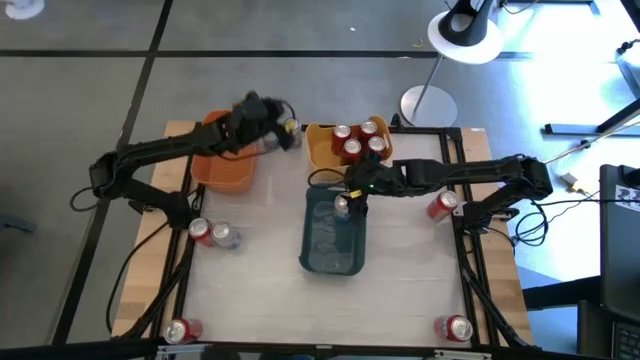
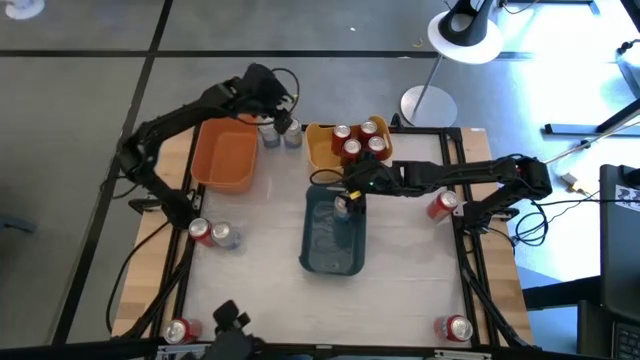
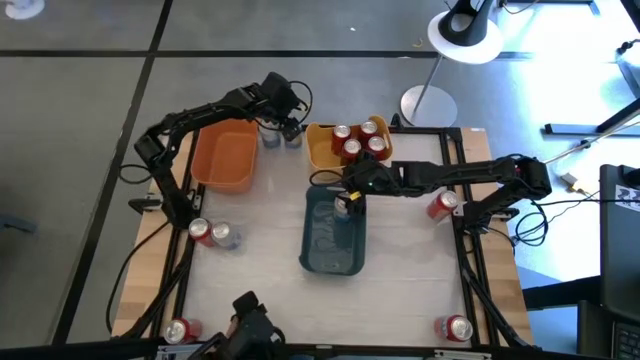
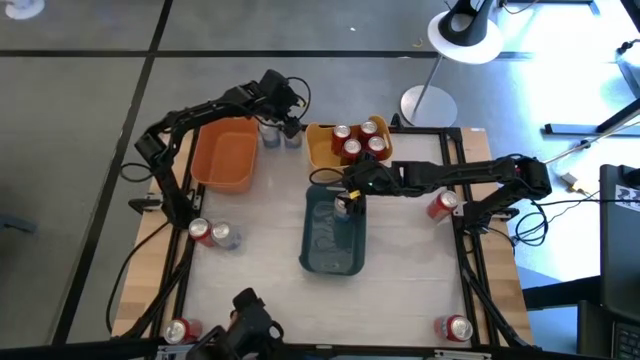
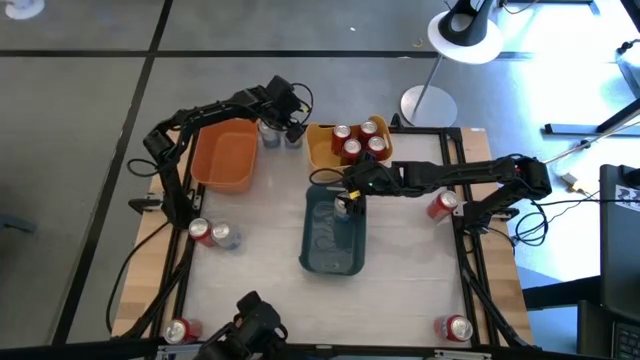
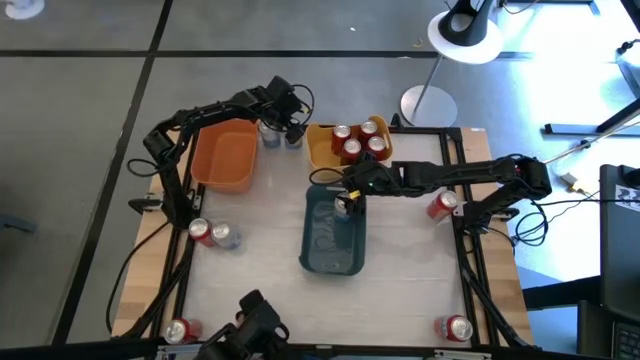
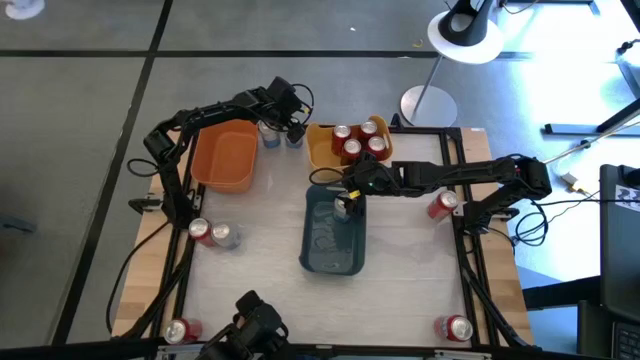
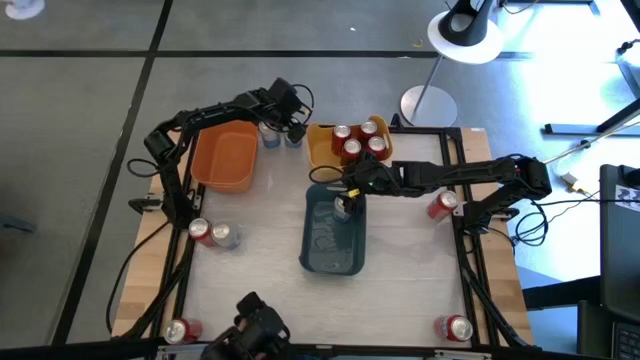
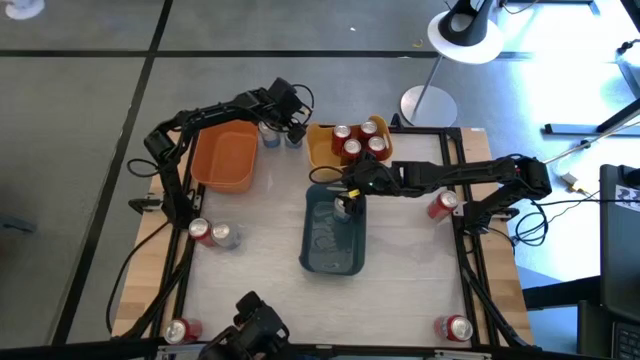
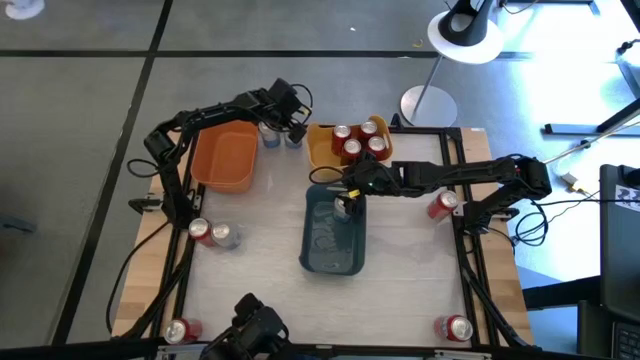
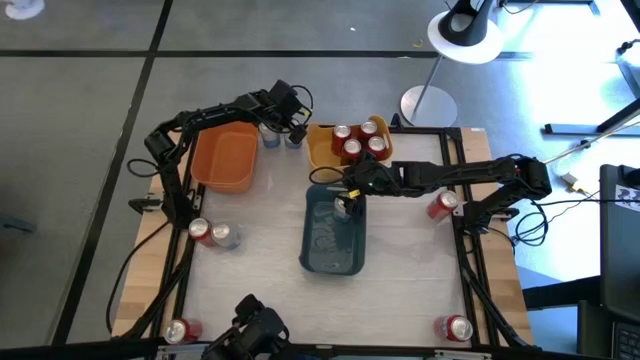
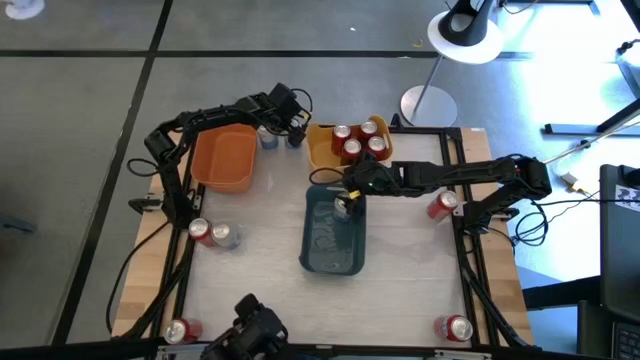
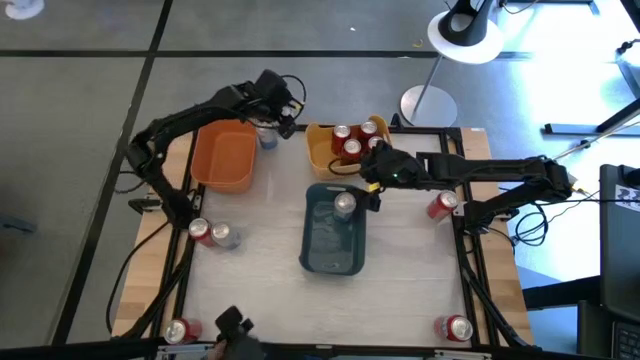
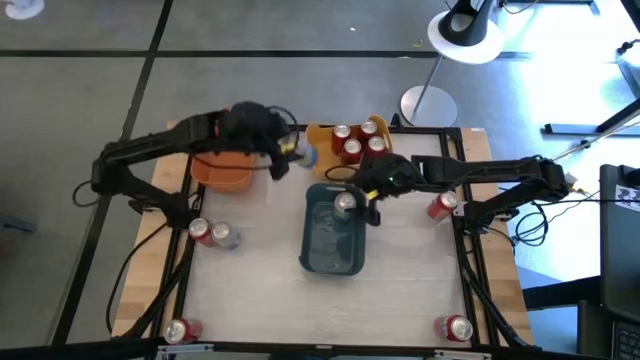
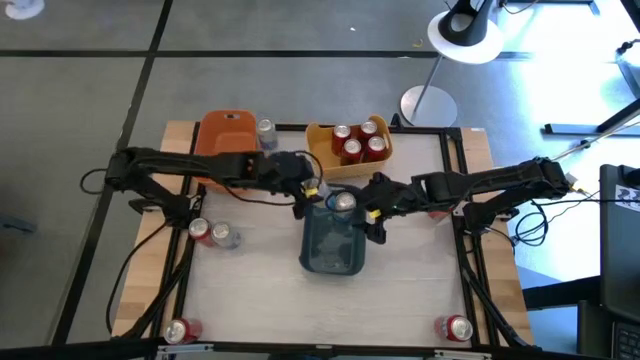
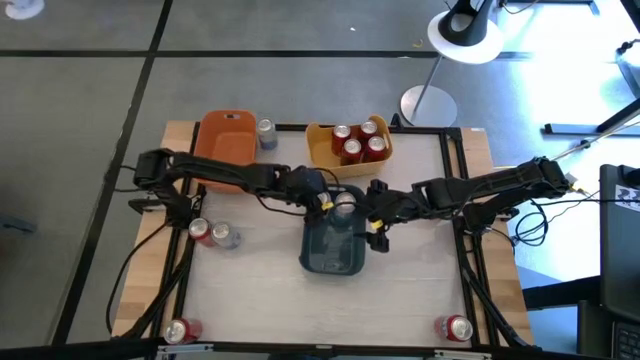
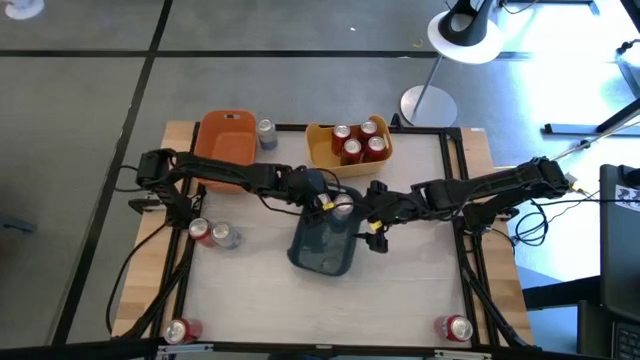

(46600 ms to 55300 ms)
Task: Sort soda cans
Put the top right white soda can into the blue bin

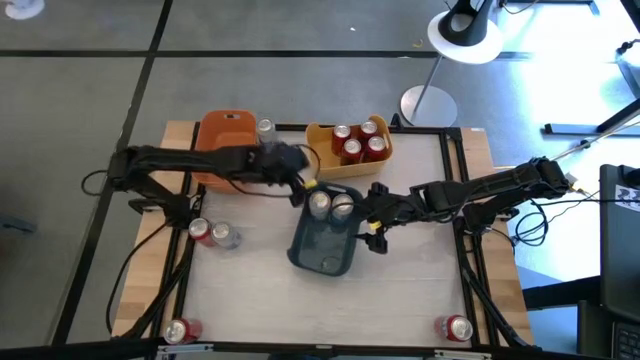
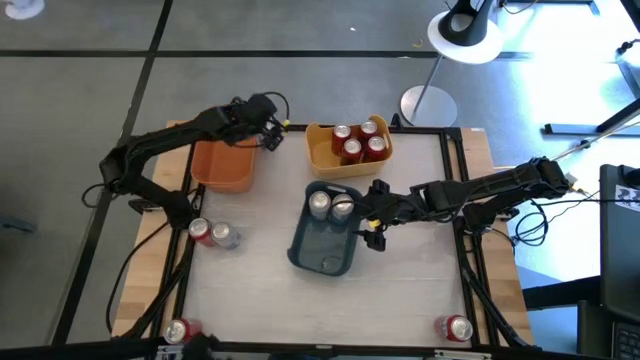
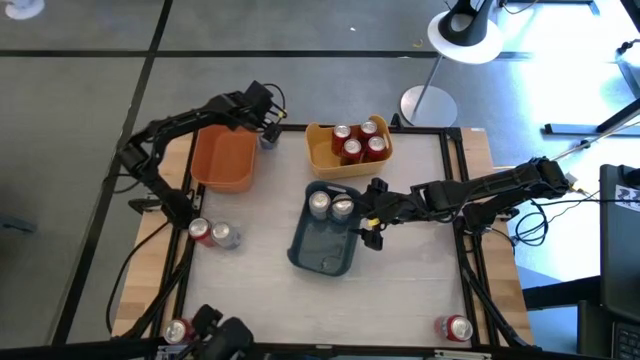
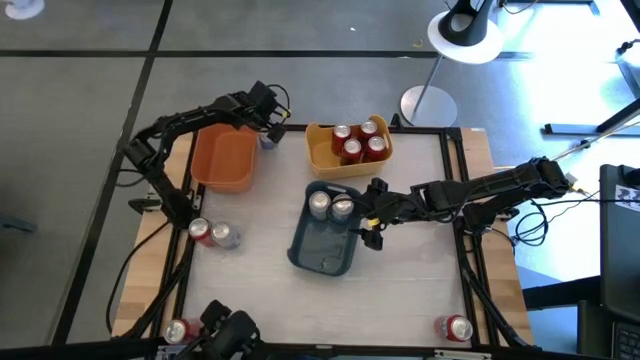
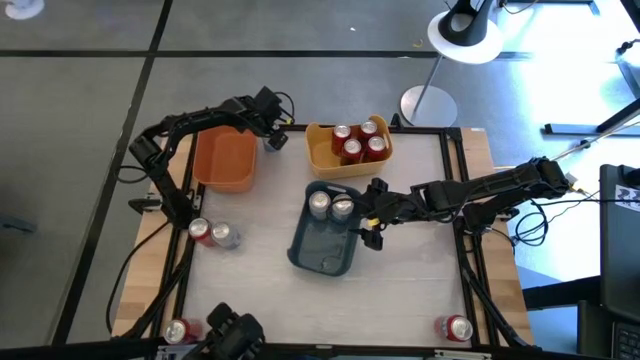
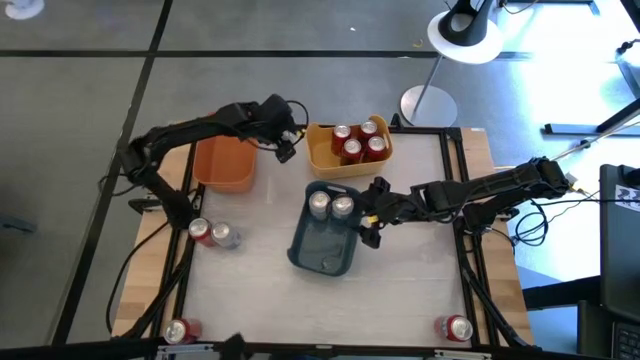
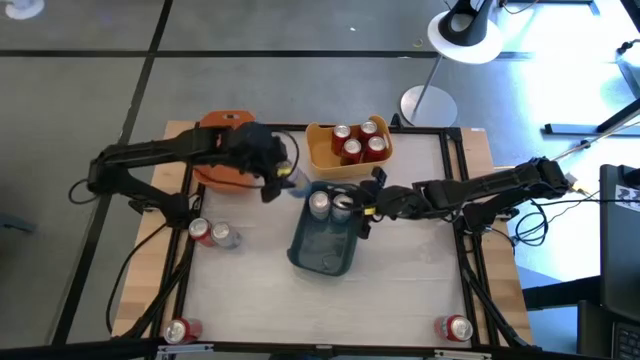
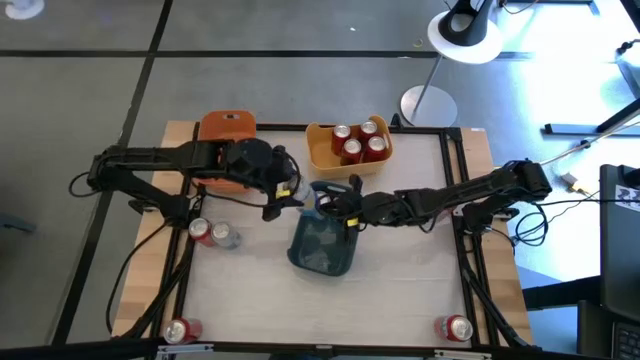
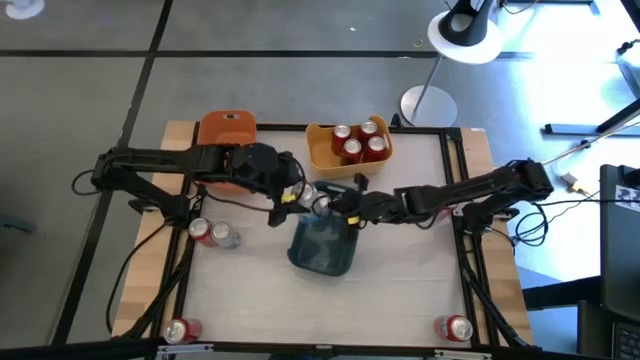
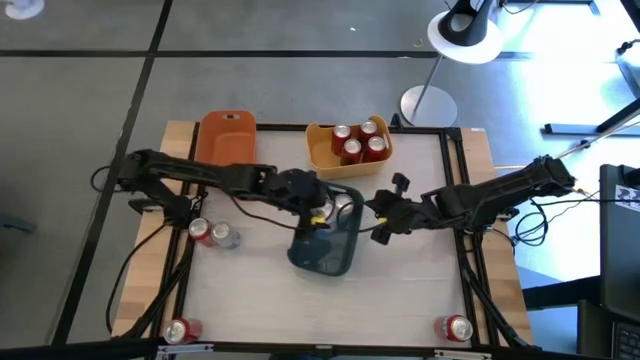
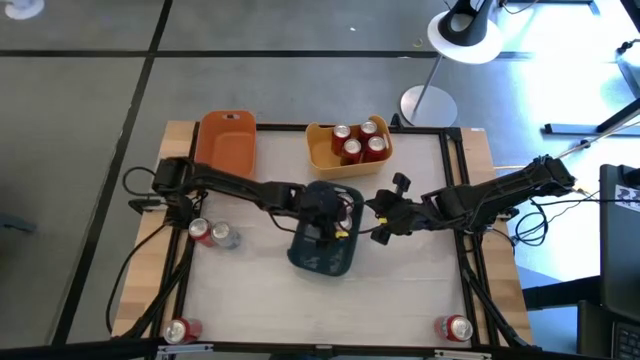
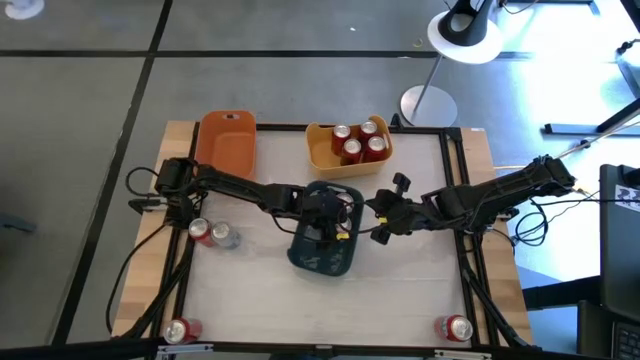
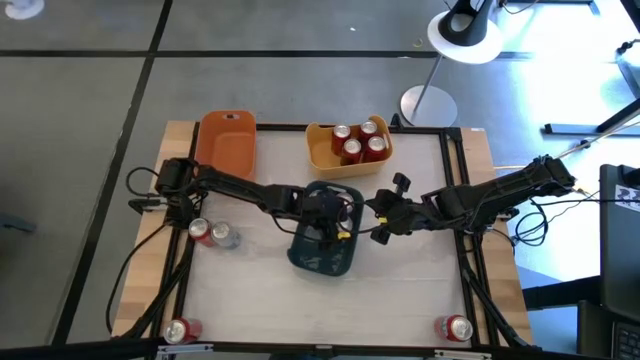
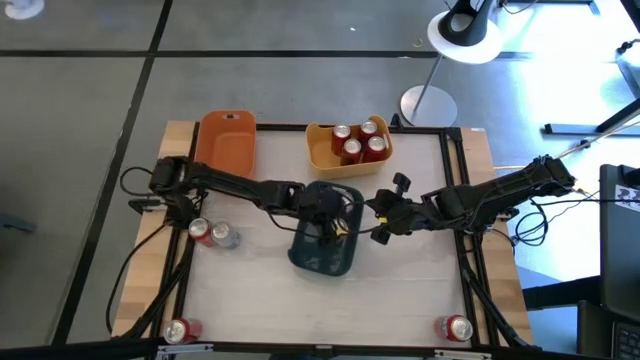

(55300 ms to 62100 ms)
Put the top white soda can into the blue bin

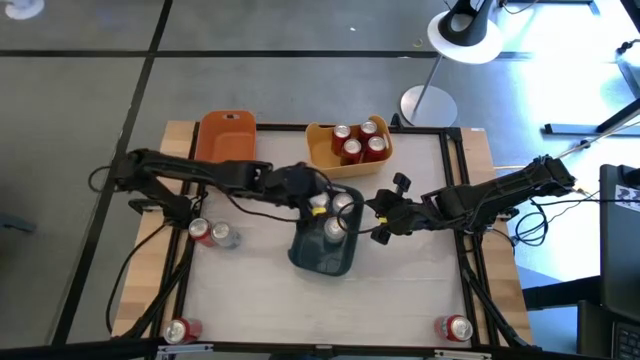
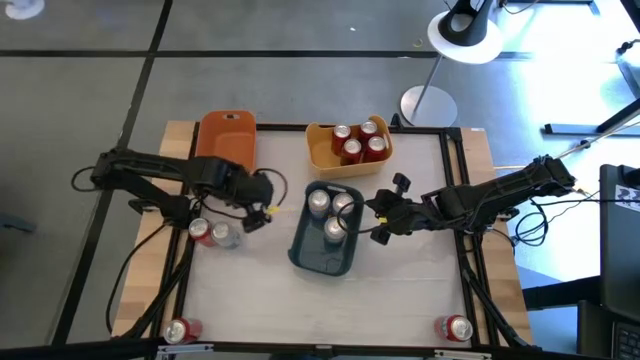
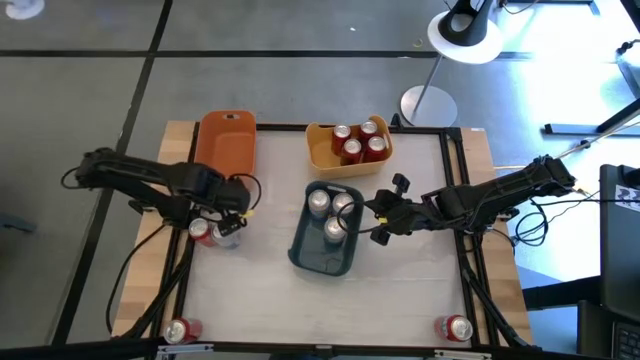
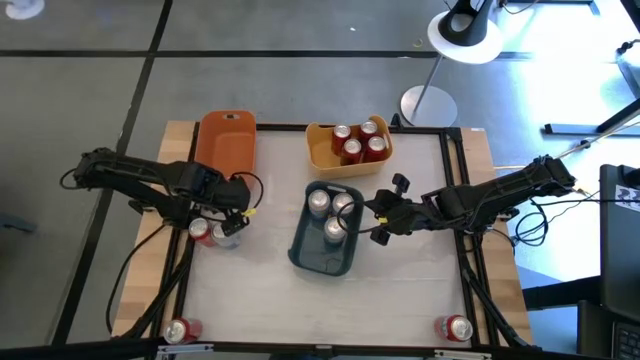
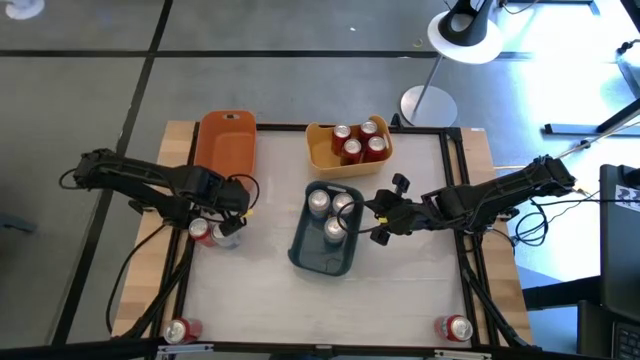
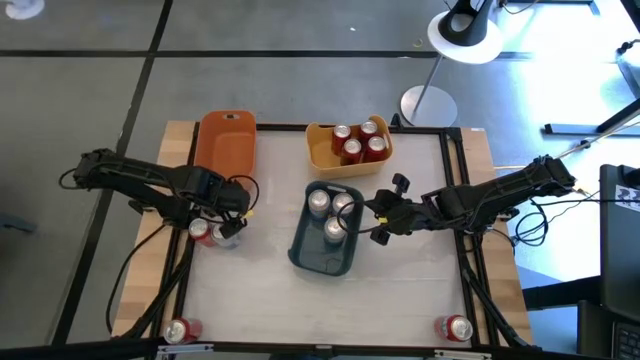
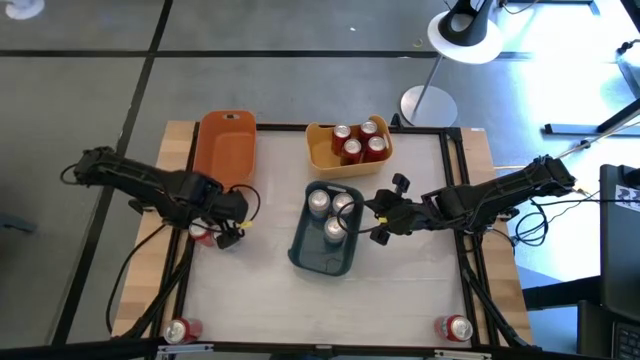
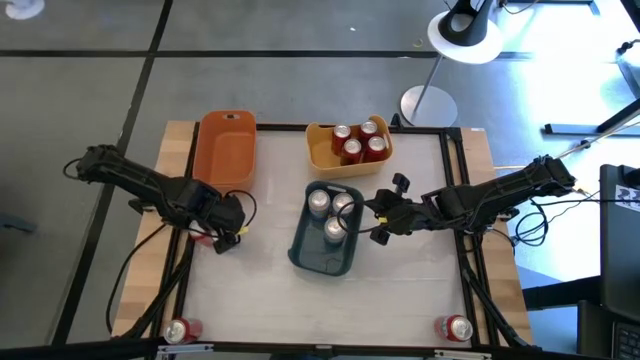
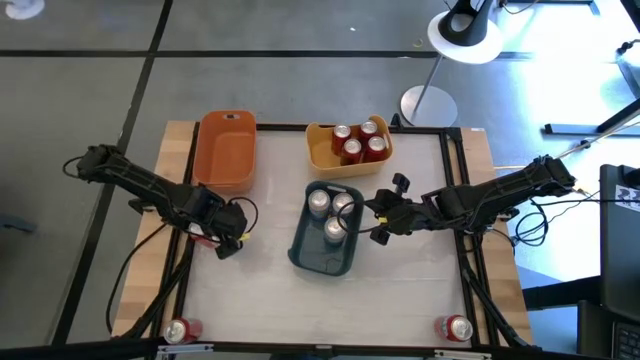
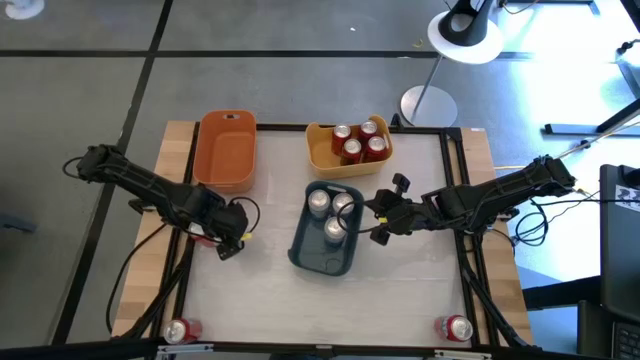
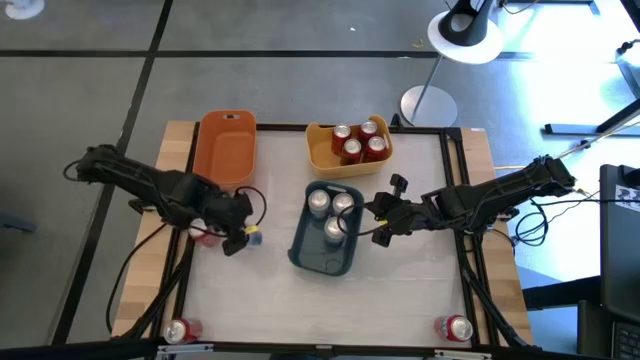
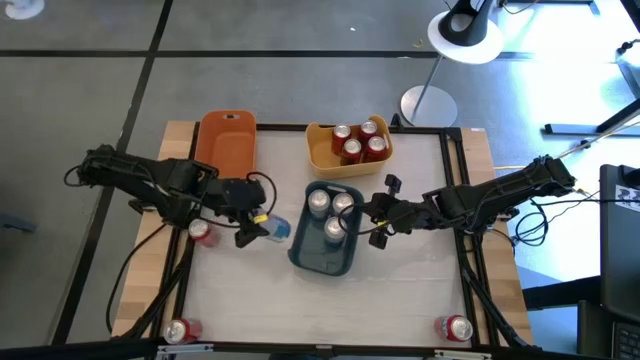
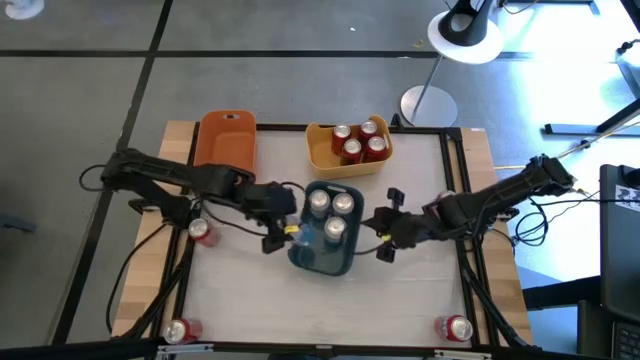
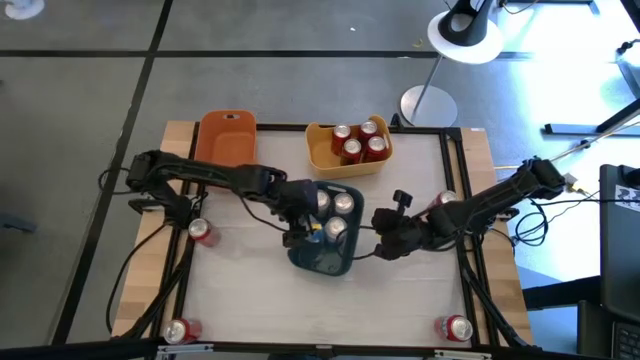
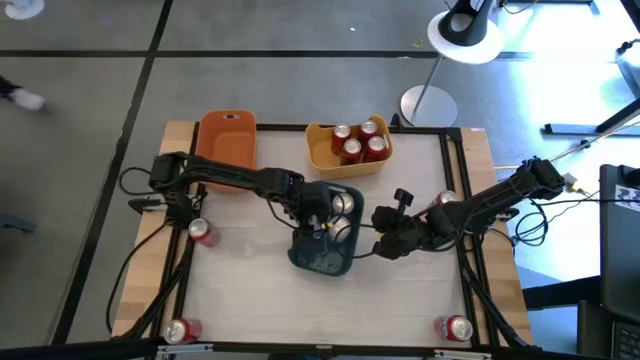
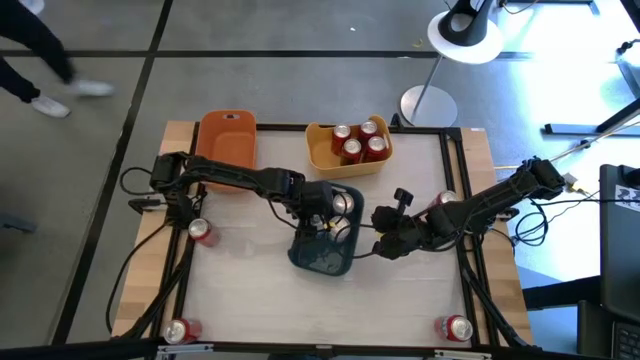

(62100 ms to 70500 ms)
Put the white soda can into the blue bin
